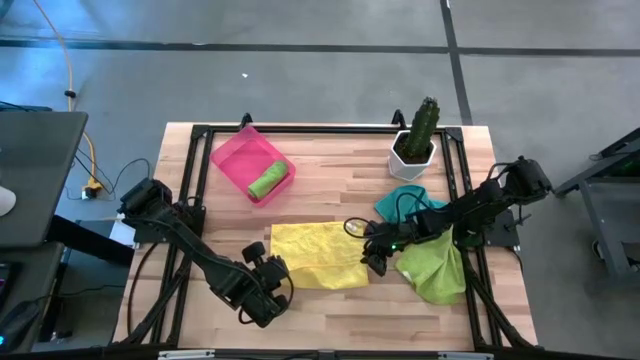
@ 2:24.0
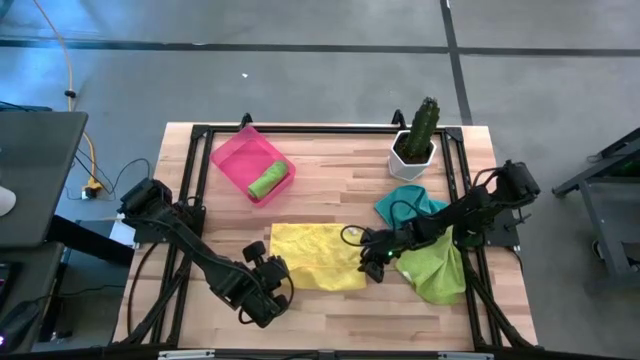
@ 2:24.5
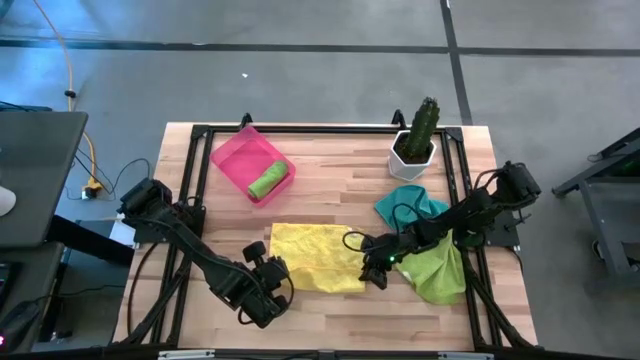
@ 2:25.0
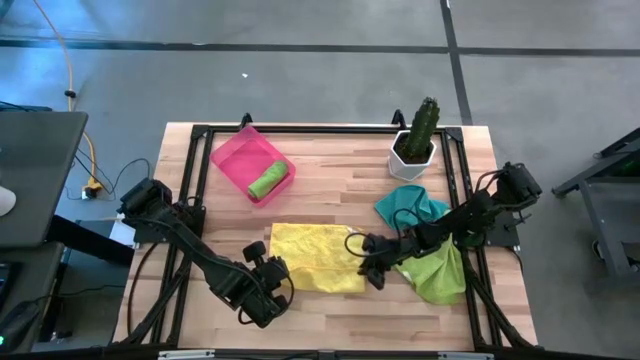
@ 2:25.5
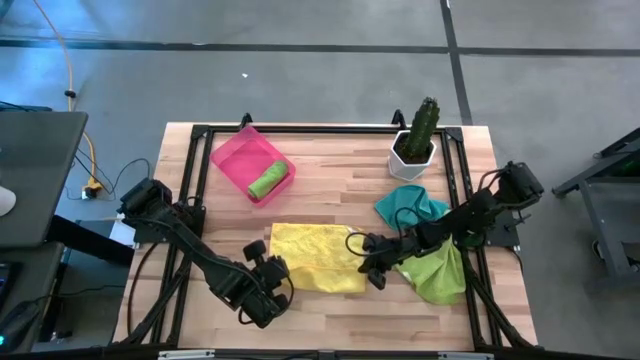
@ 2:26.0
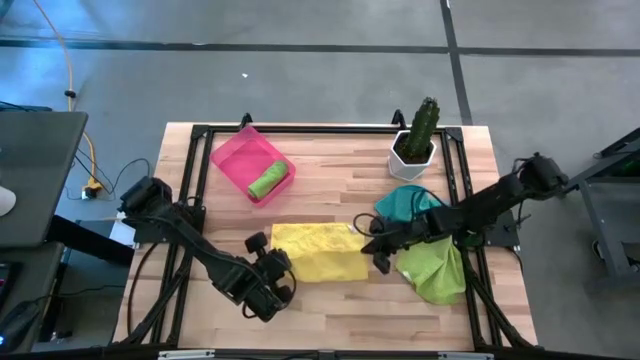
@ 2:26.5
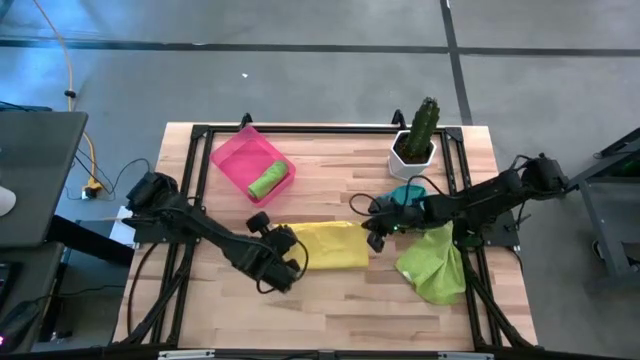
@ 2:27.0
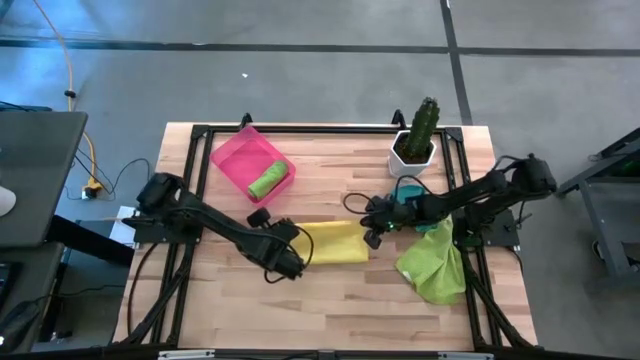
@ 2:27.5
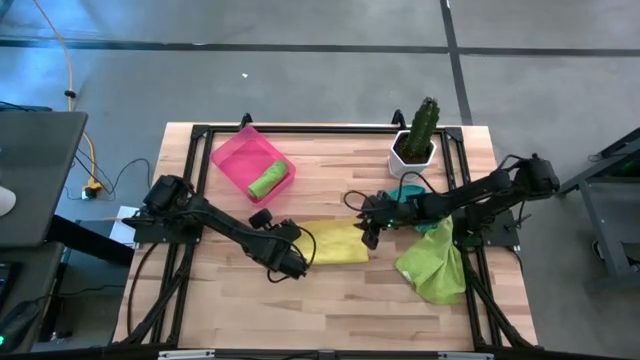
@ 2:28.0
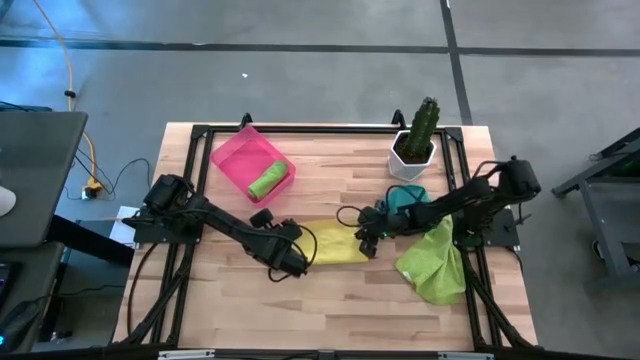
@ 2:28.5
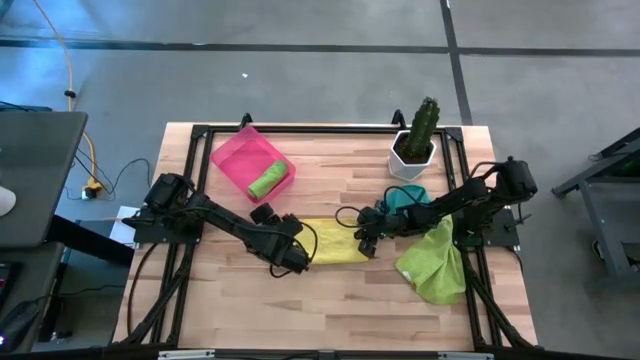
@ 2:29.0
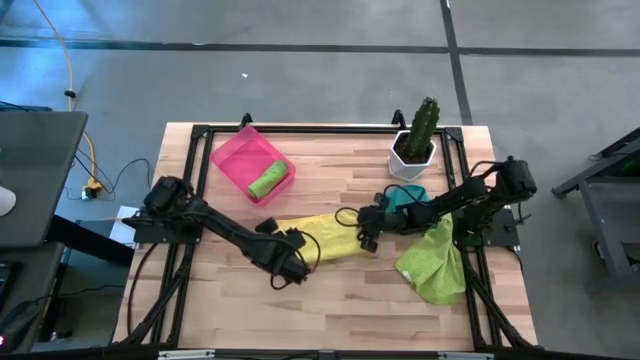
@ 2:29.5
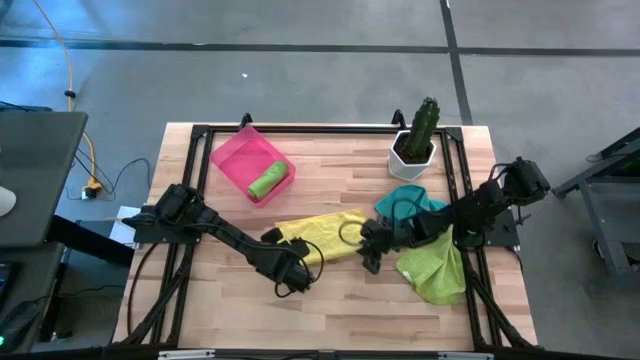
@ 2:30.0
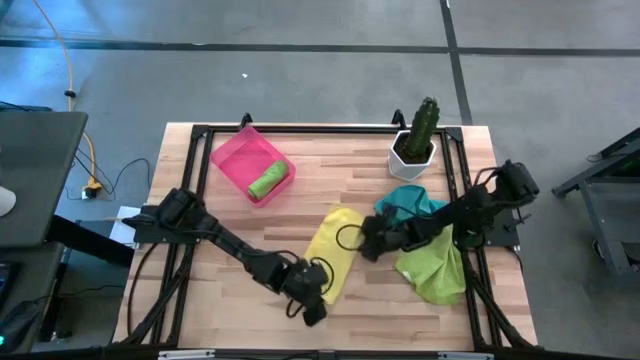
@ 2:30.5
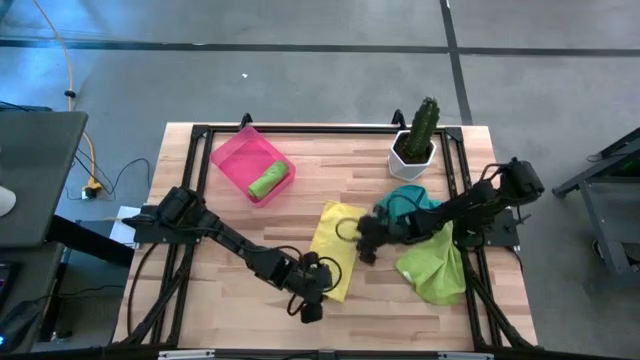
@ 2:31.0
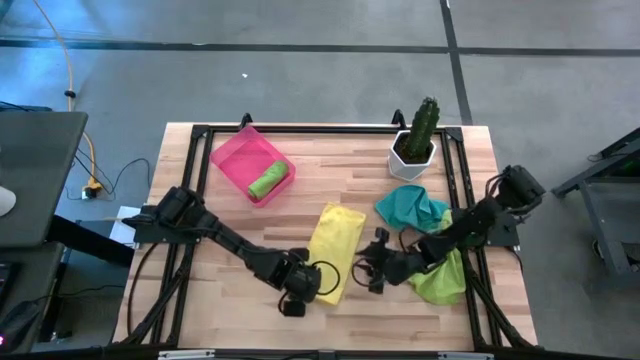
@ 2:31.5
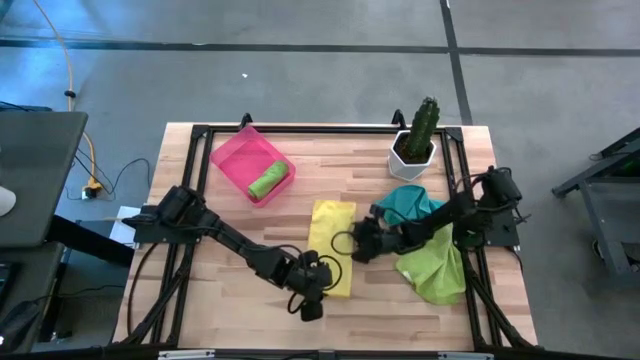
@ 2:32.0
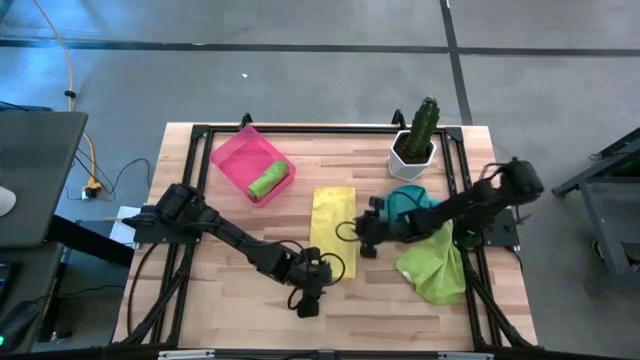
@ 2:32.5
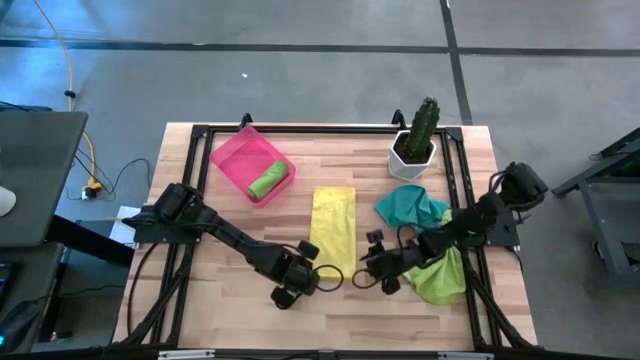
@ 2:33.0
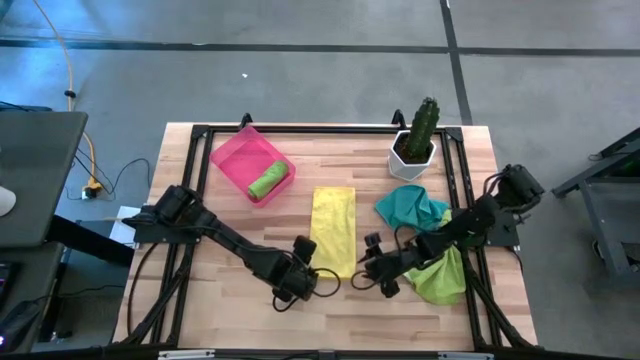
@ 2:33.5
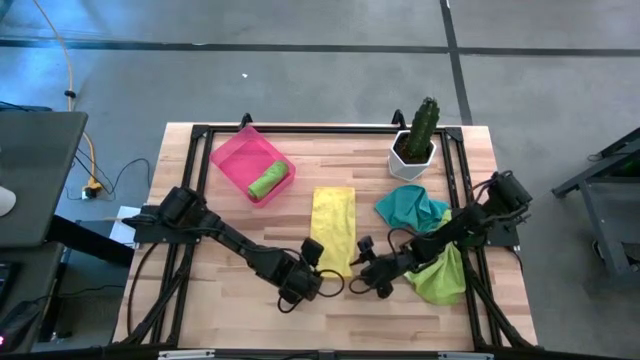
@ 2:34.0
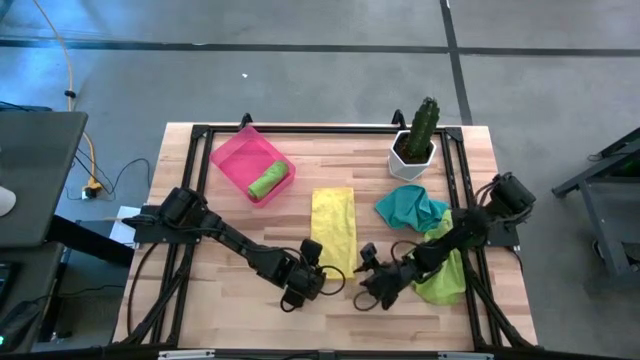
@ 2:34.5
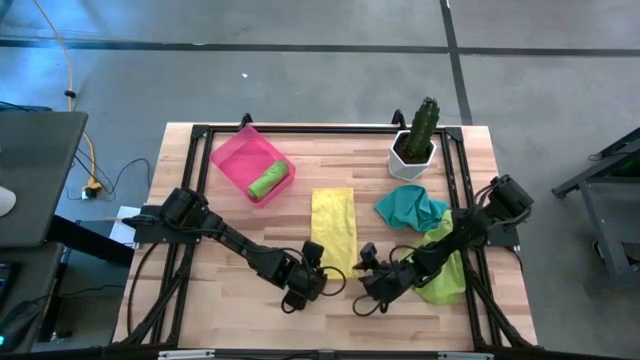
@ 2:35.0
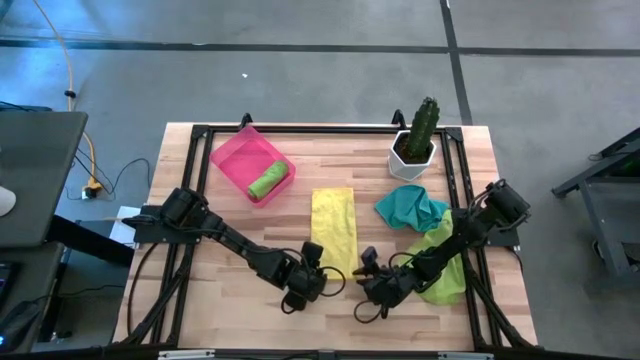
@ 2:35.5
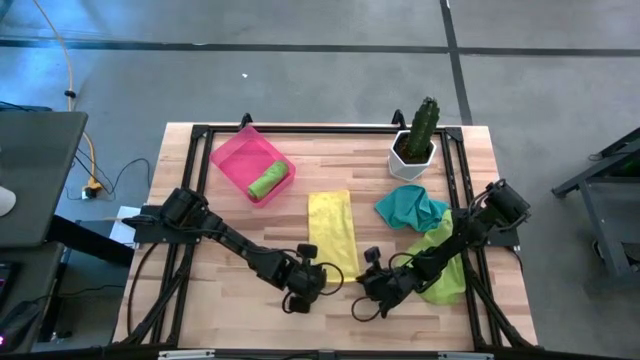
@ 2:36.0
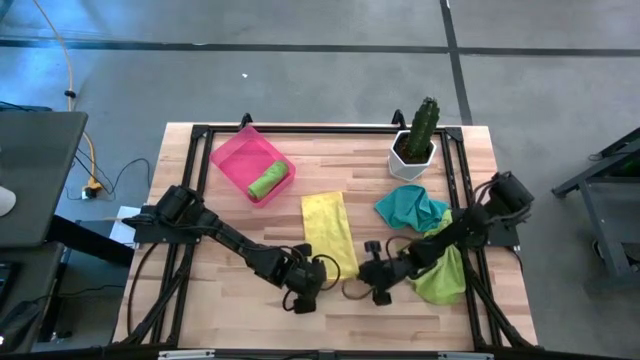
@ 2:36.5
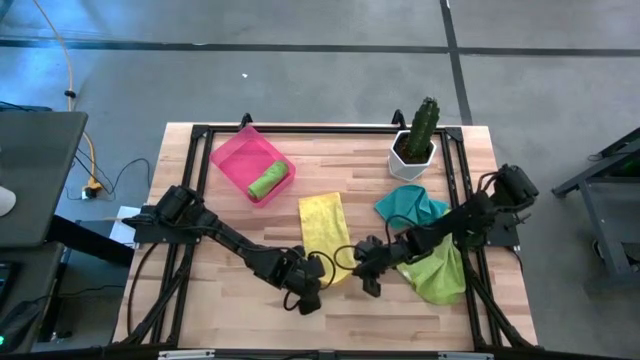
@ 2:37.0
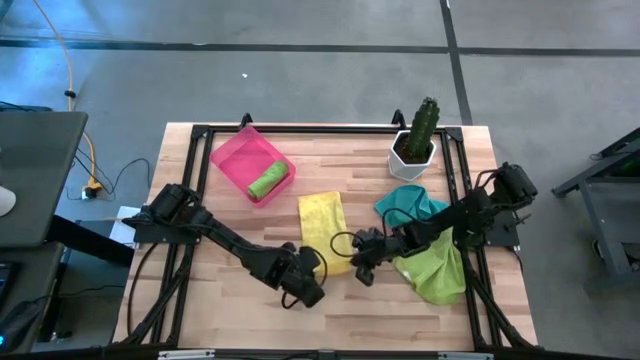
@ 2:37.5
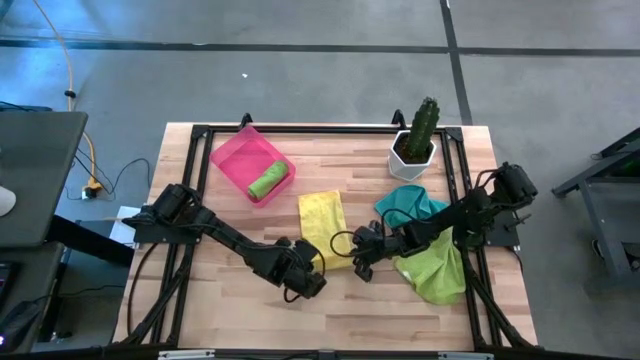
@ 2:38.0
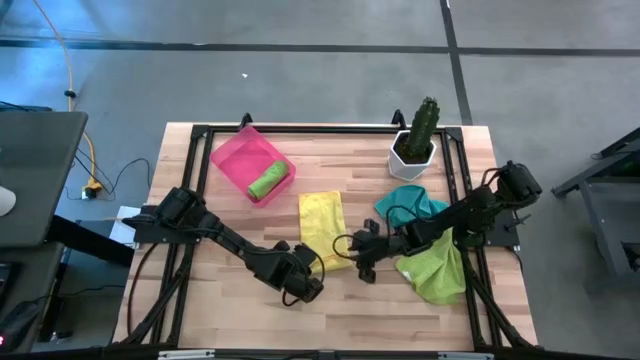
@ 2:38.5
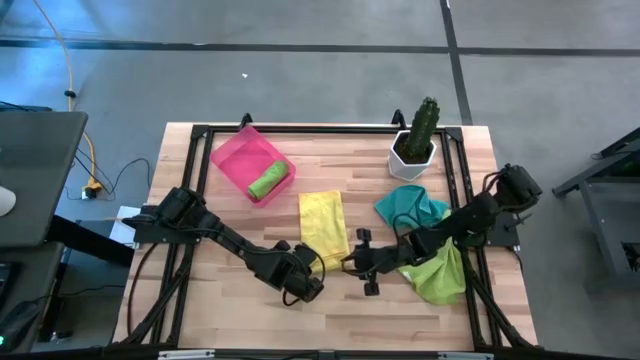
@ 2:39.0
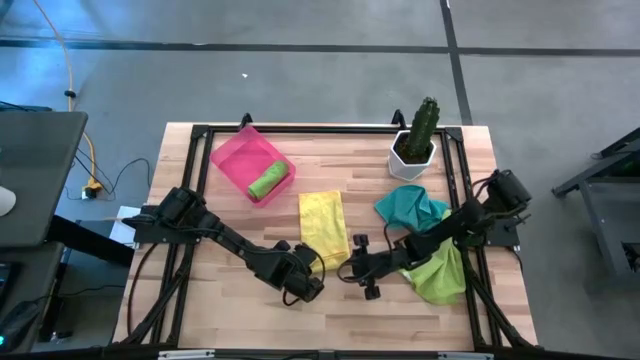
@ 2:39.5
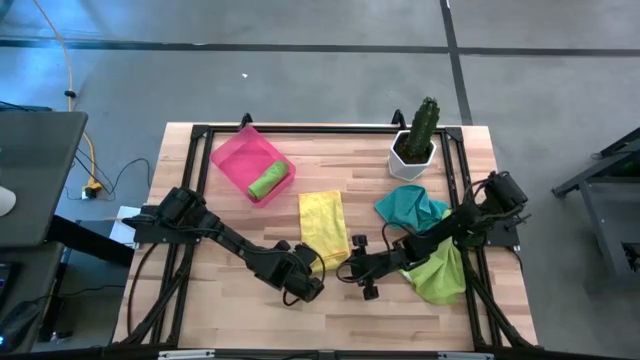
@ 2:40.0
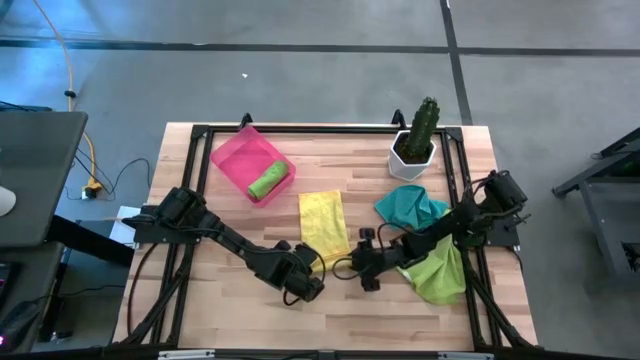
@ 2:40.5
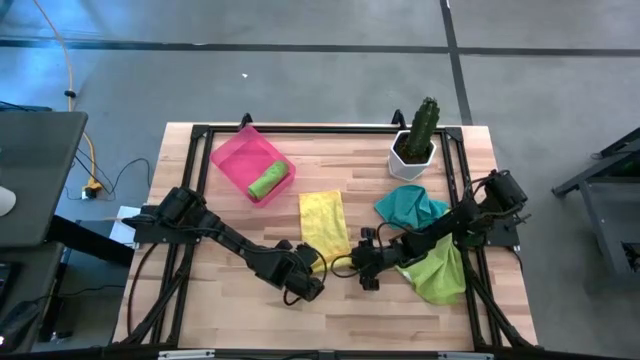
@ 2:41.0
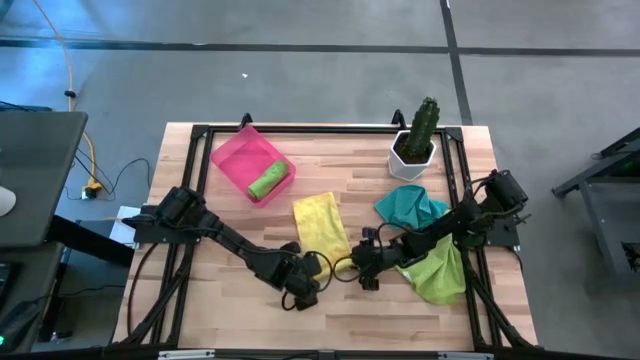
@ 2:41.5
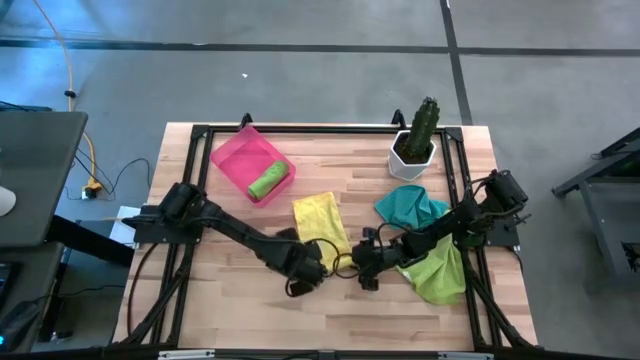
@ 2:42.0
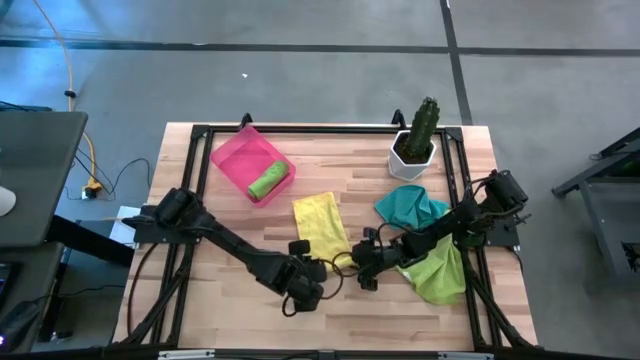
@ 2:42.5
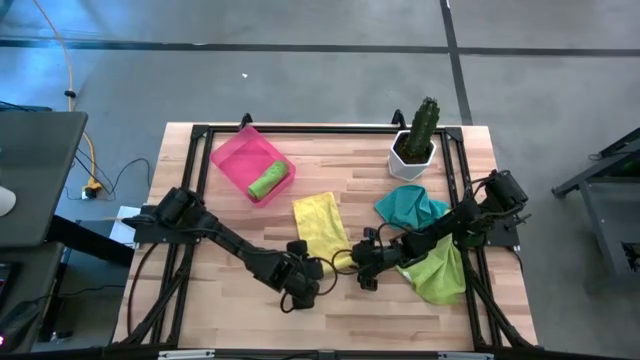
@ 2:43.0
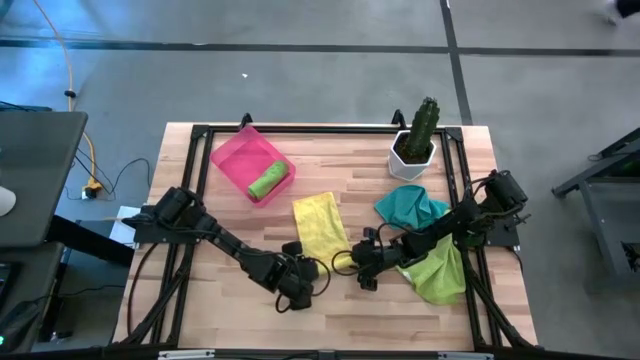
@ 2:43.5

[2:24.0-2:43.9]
Task: Roll microfiber towels into tight, uniform cylinder then place into a basket
Roll the yellow microfiber cloth

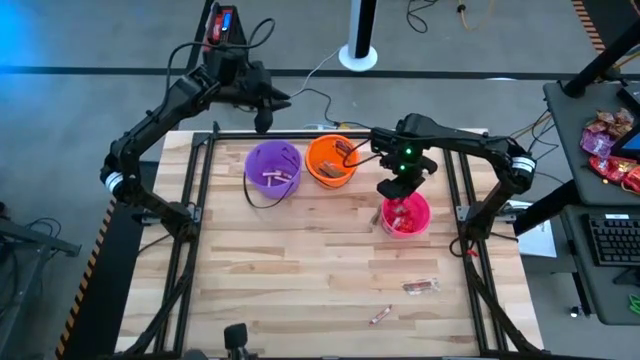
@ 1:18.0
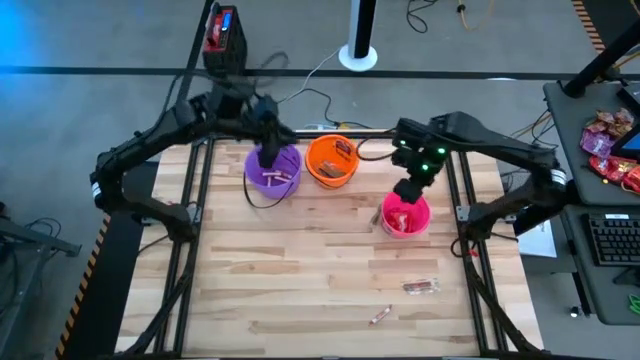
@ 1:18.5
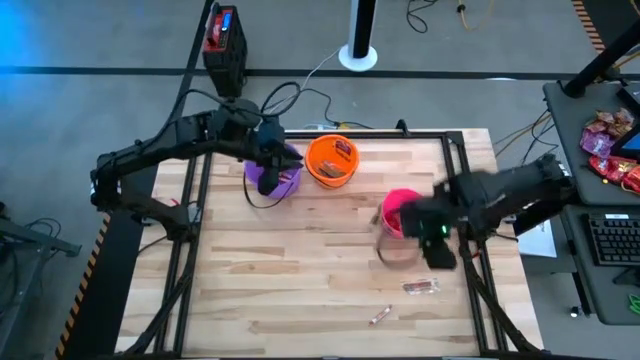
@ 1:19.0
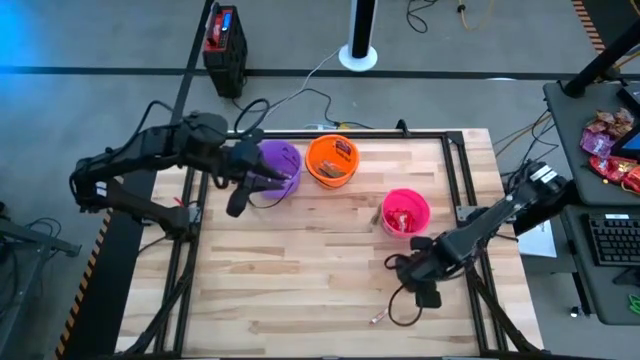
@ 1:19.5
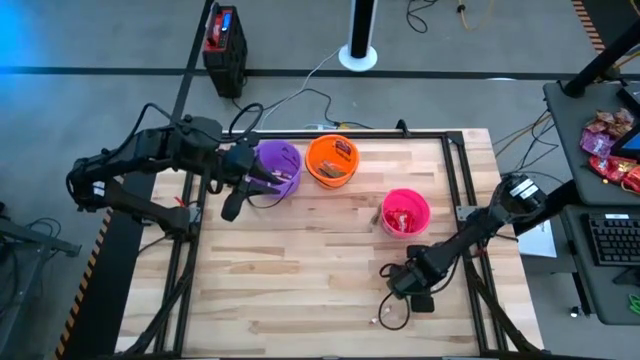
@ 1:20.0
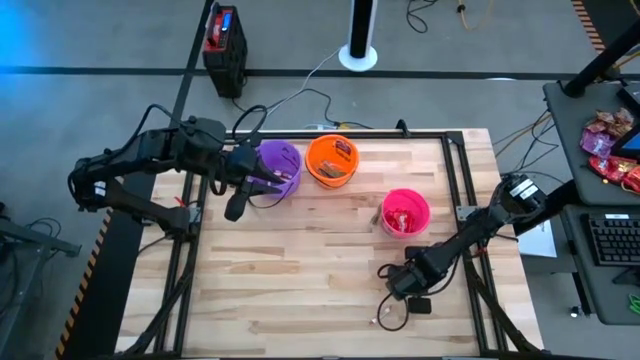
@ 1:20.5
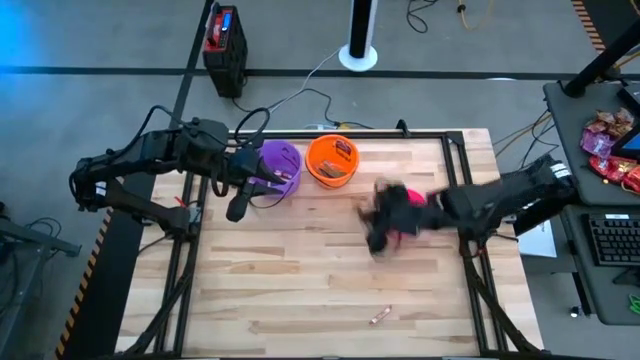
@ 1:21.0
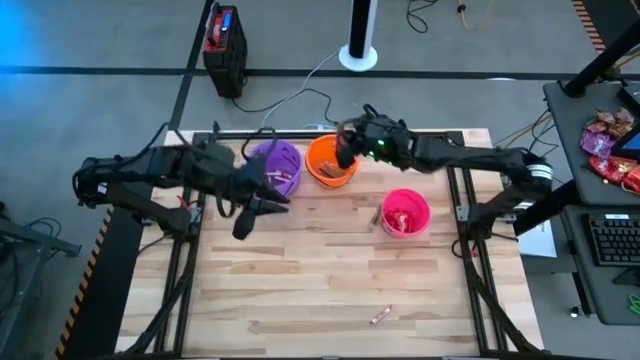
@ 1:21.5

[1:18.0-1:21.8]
Task: Sort candy by brand, put in halloween buckets
Put the orange candy into the orange bucket
